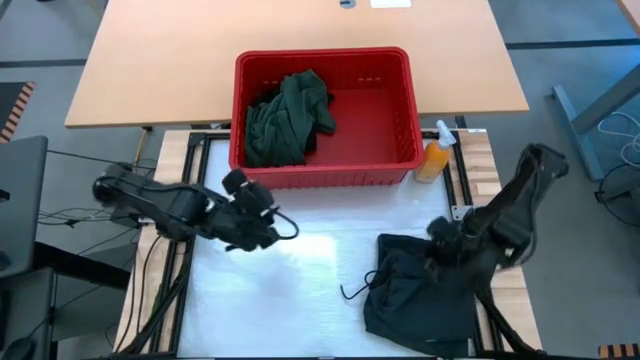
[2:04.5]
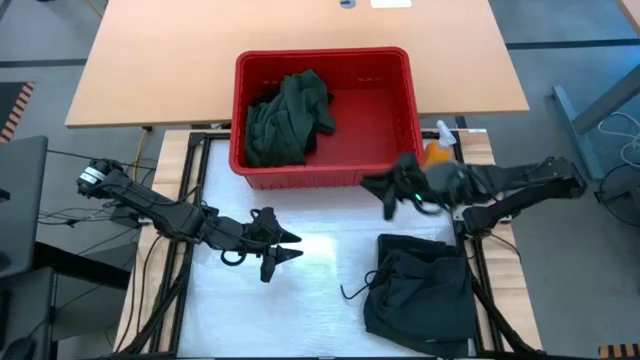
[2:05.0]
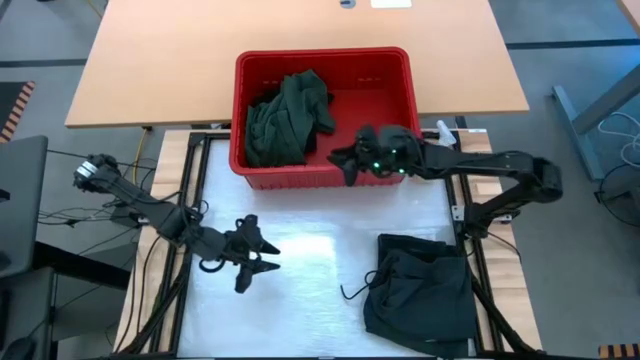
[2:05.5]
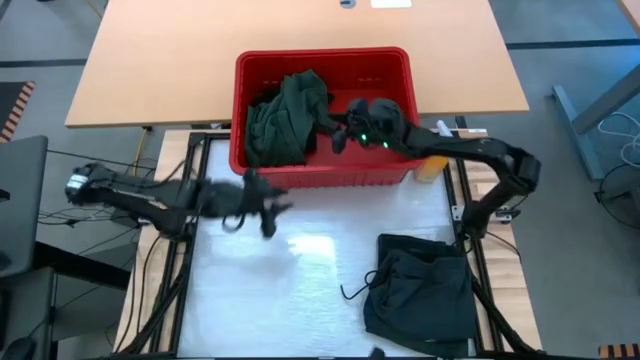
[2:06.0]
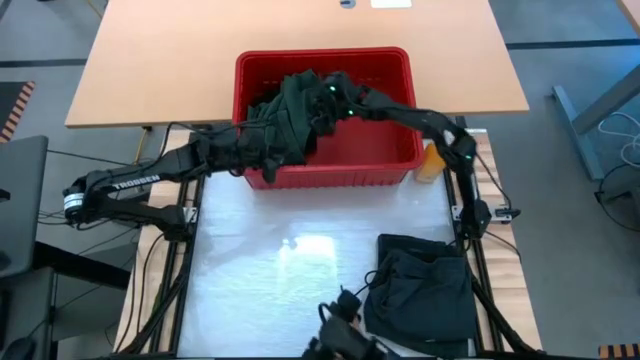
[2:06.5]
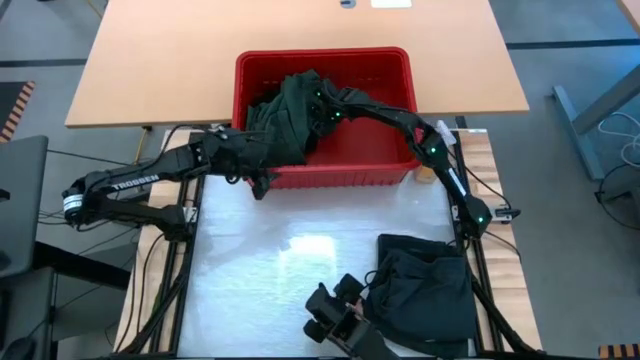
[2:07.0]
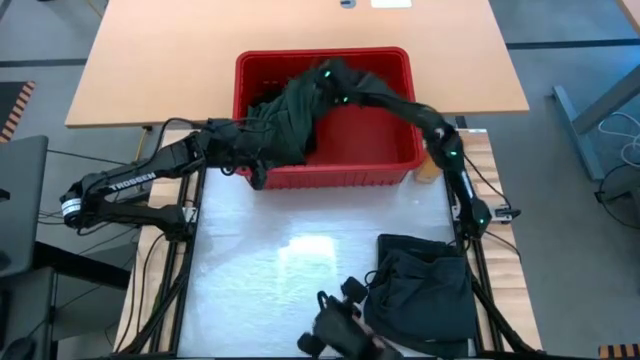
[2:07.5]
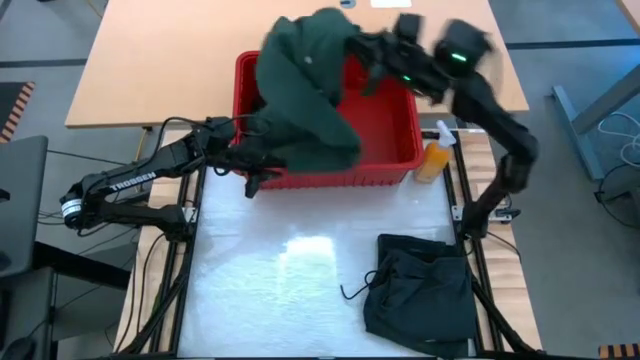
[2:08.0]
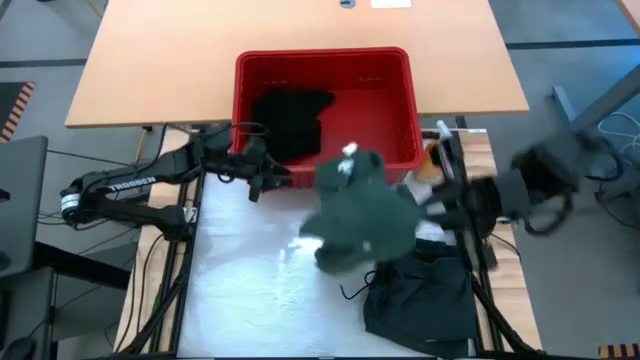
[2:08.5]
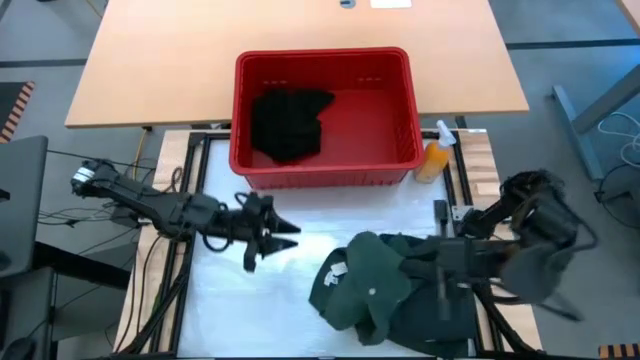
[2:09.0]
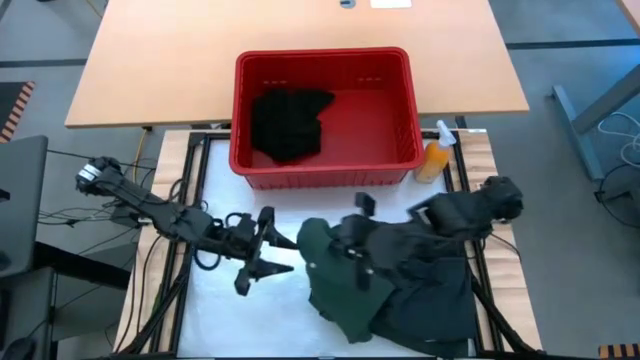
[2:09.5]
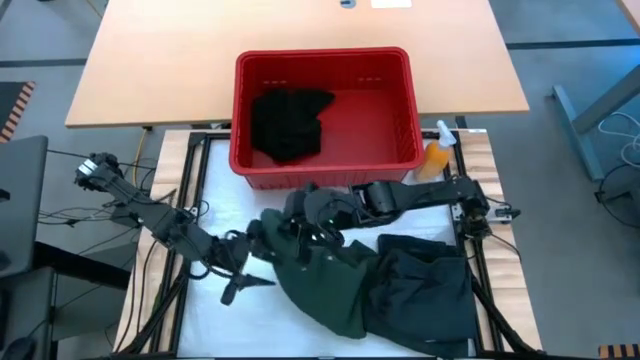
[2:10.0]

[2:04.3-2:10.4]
Task: Fold laundry
Remove the green shirt from the red bin

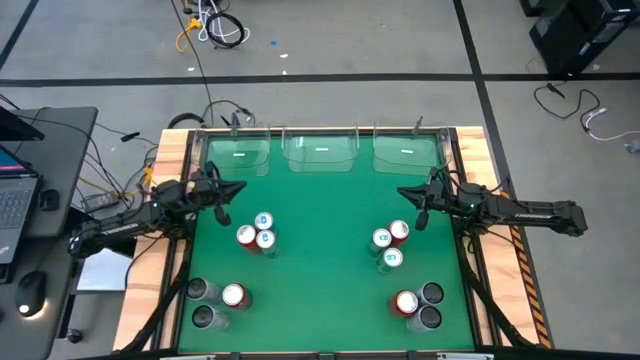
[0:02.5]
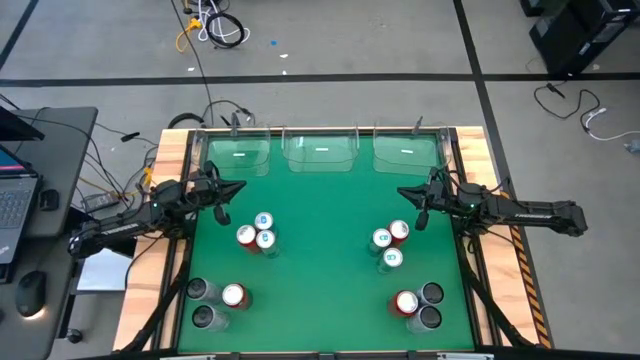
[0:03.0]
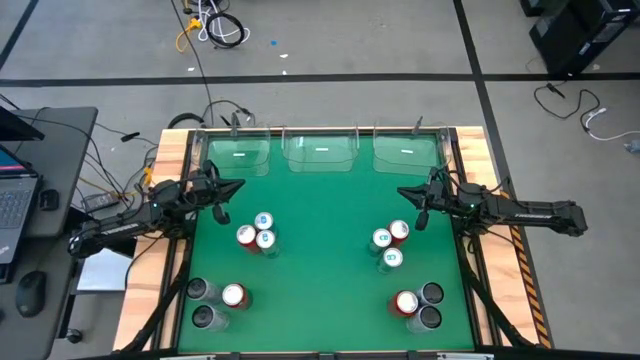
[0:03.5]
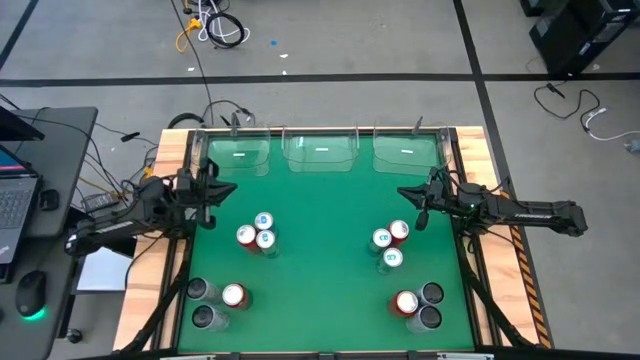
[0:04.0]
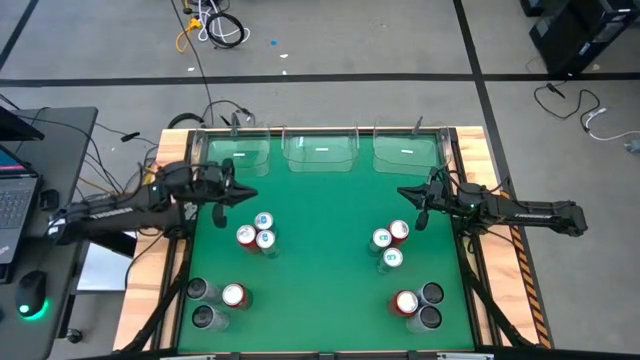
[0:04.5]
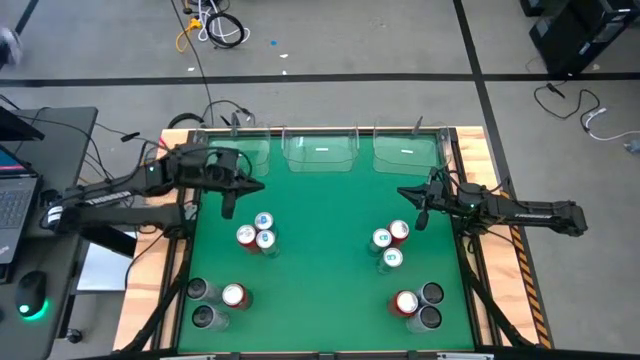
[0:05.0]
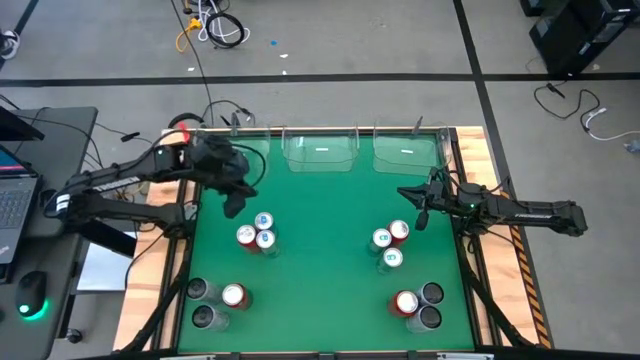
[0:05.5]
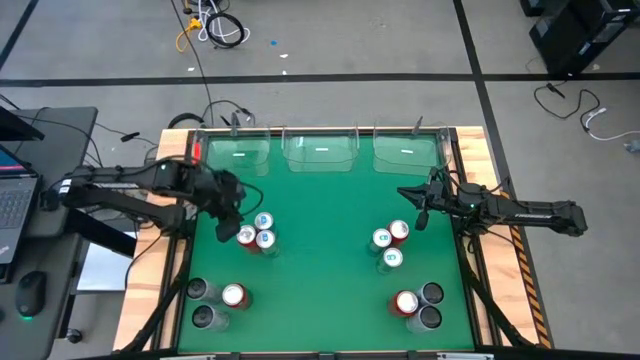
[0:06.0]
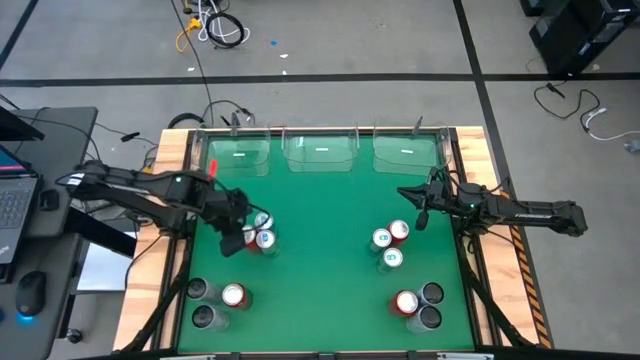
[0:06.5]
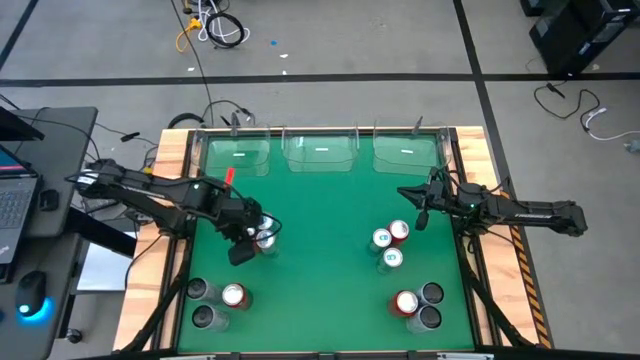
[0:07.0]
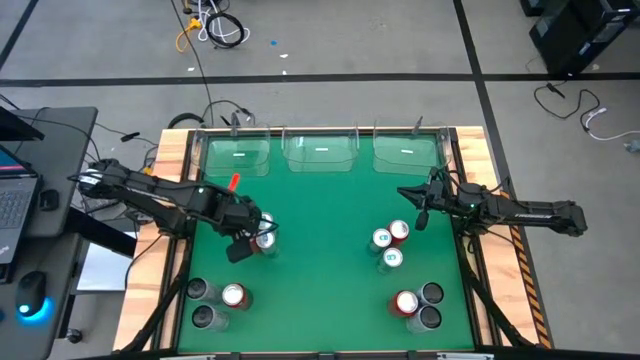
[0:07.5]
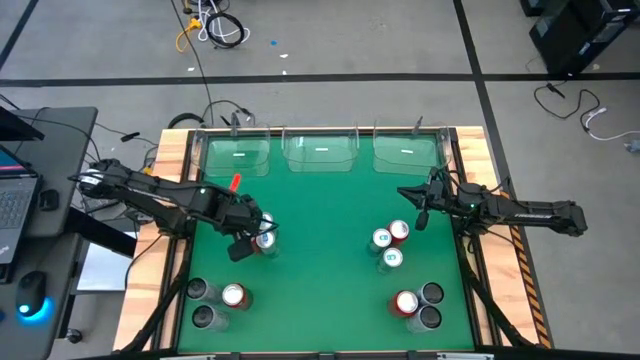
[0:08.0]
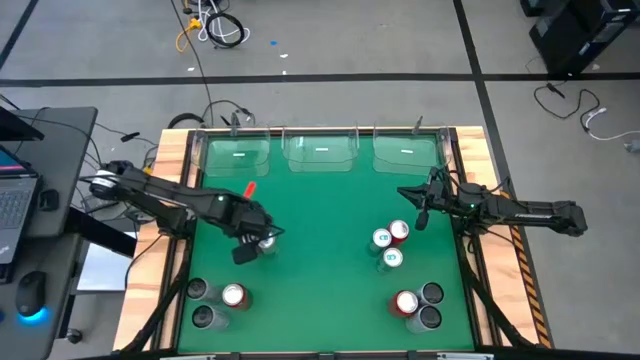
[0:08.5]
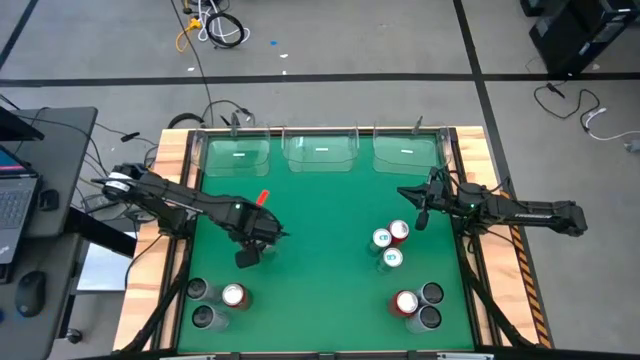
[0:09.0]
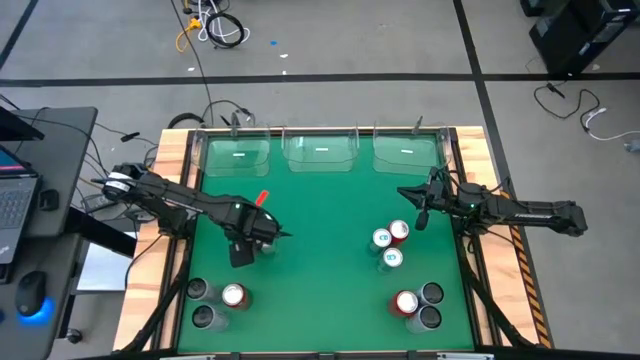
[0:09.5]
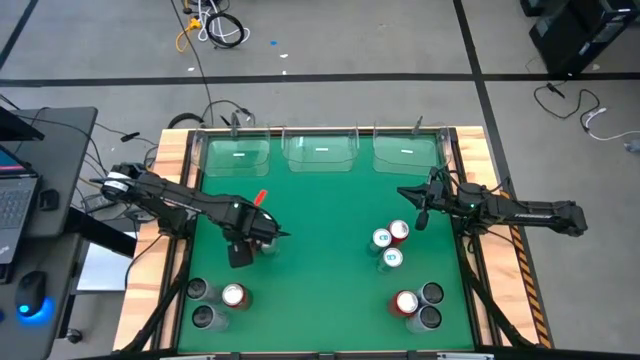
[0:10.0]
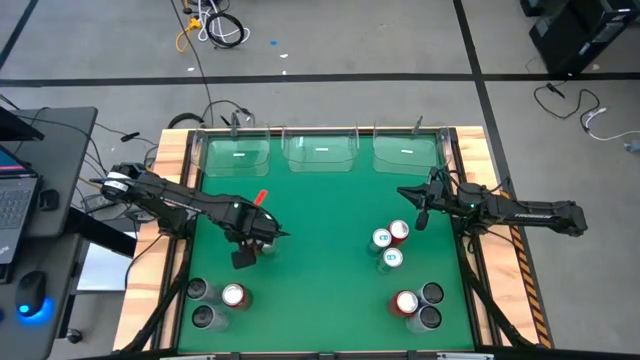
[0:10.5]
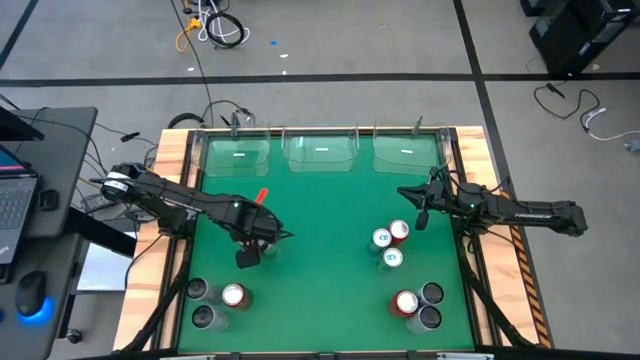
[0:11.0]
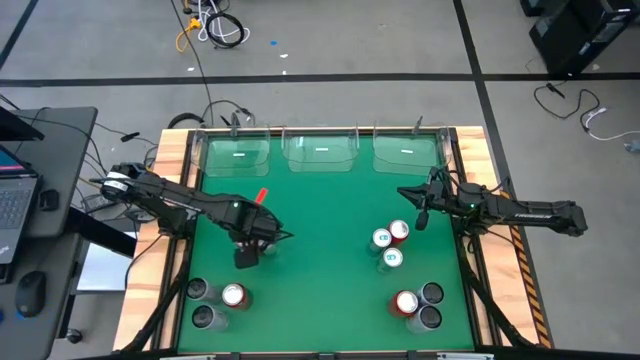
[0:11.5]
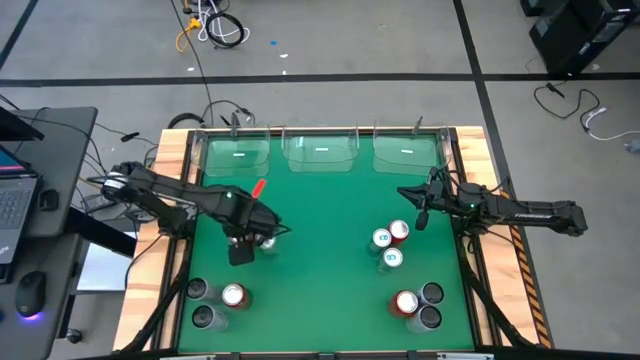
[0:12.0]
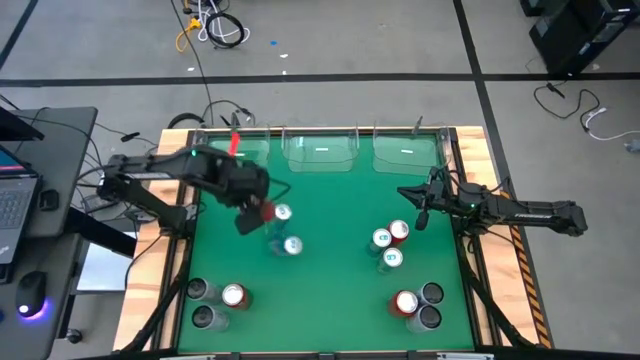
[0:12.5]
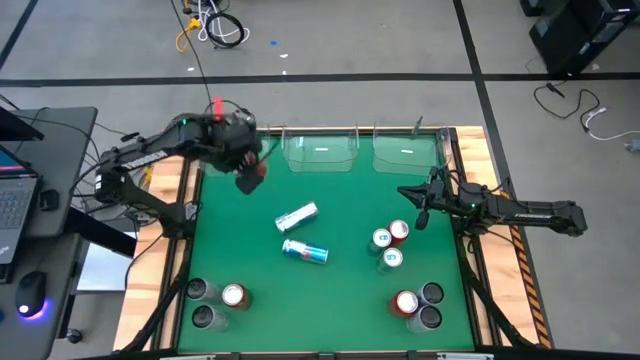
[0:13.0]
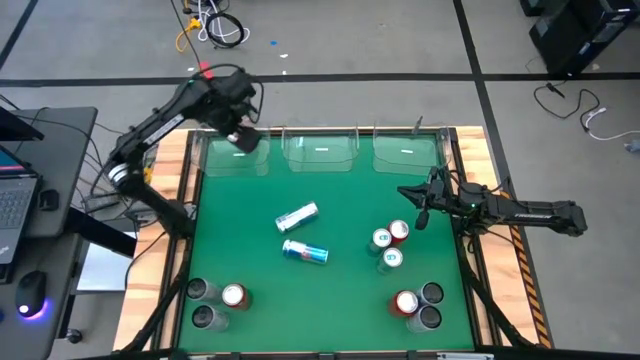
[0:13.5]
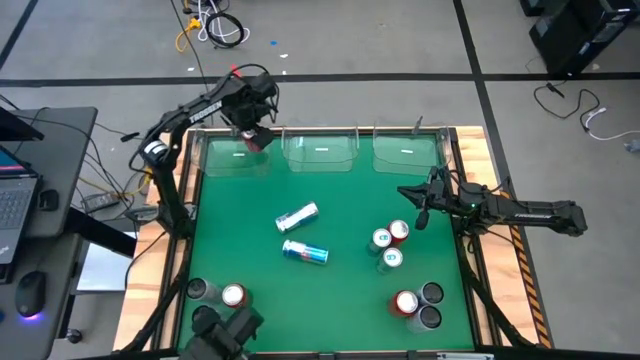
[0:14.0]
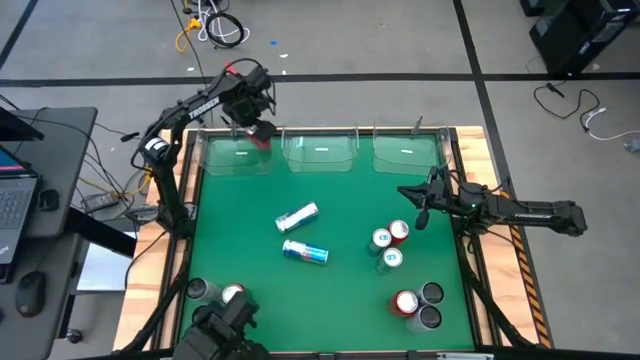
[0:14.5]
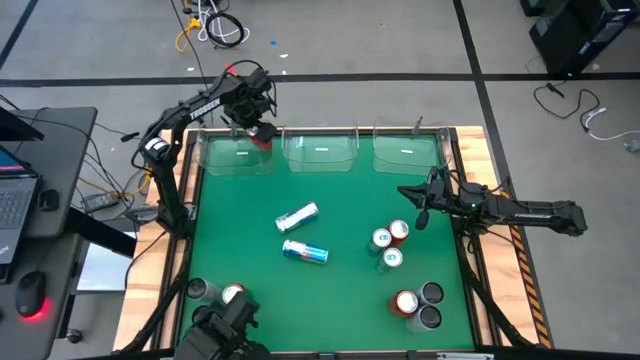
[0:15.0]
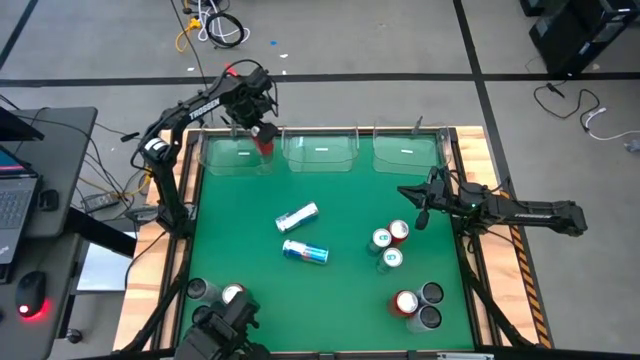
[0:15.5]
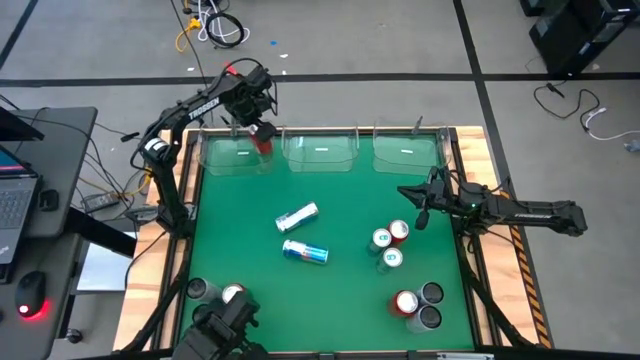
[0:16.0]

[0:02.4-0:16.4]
Task: Sort soda cans
Put the red soda can into the transparent left bin
